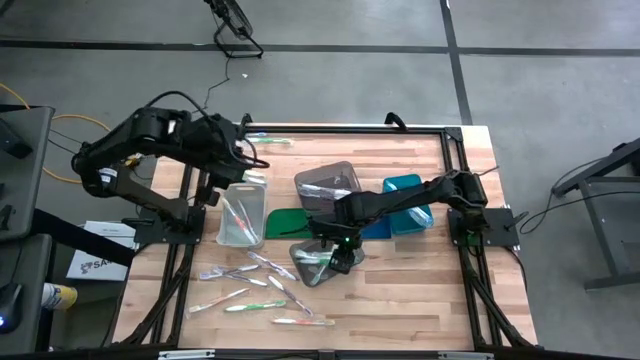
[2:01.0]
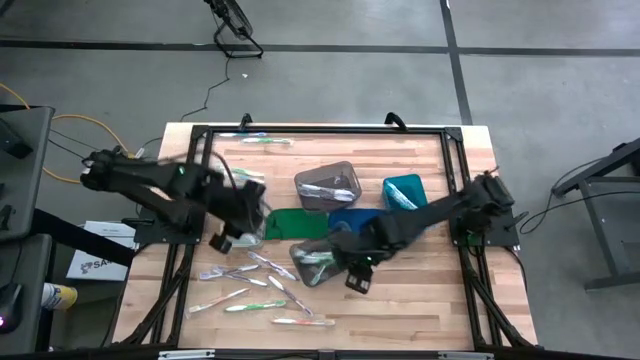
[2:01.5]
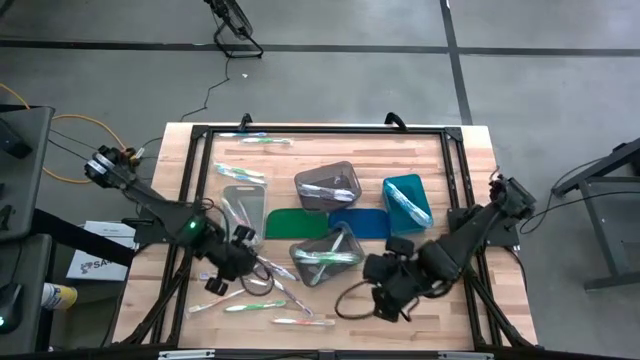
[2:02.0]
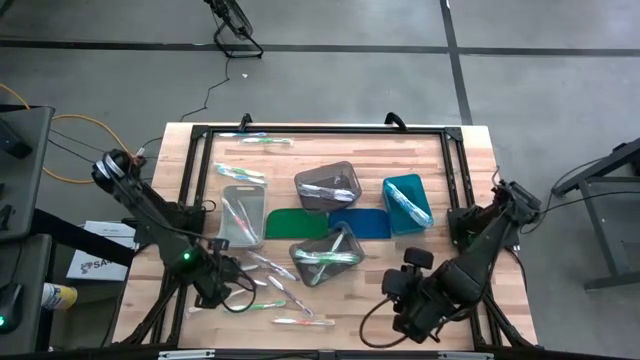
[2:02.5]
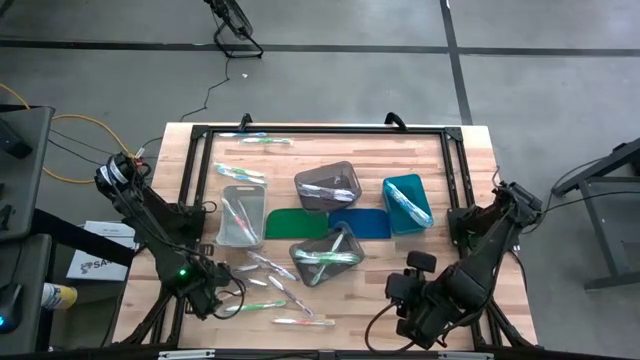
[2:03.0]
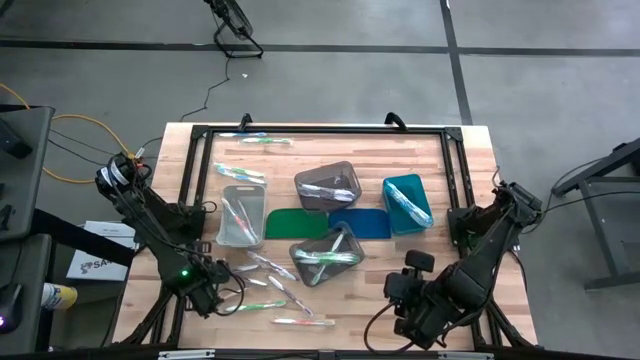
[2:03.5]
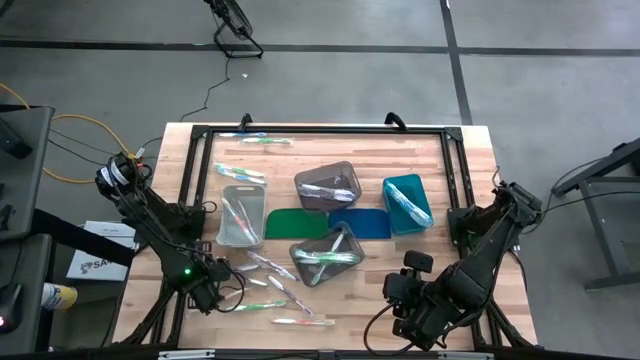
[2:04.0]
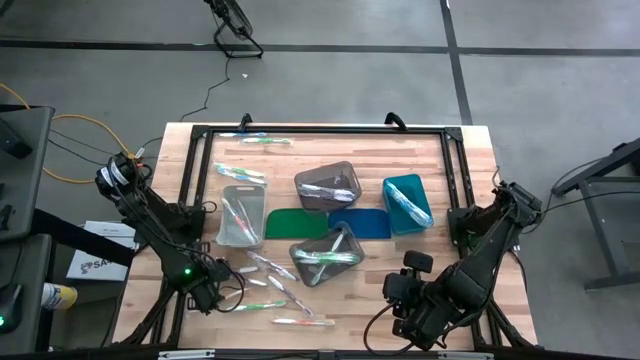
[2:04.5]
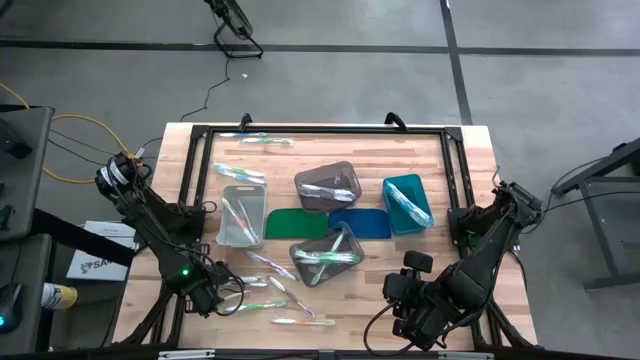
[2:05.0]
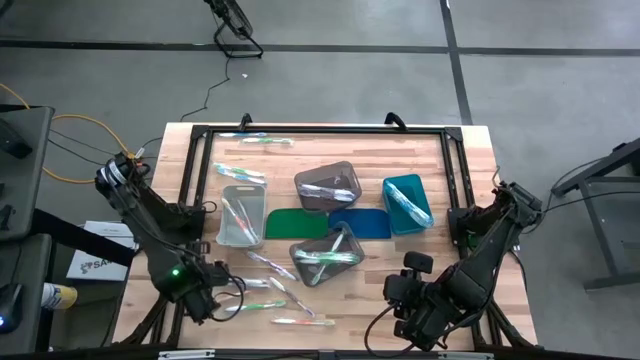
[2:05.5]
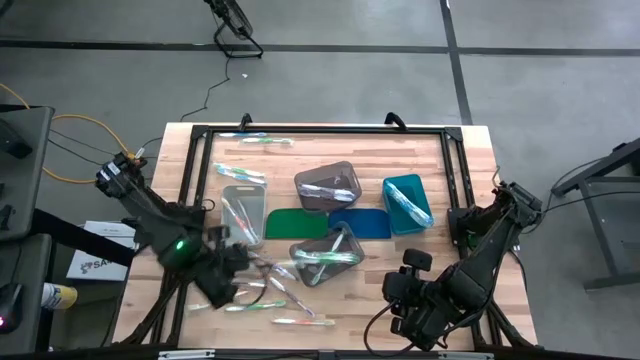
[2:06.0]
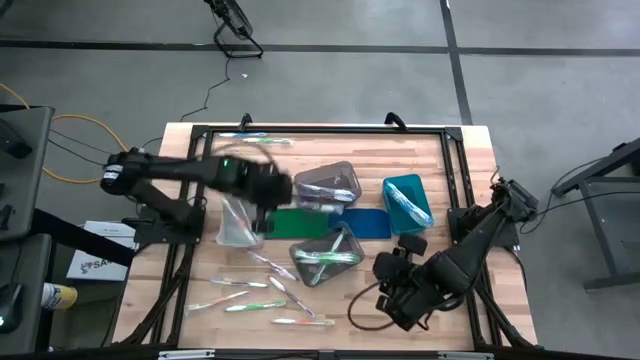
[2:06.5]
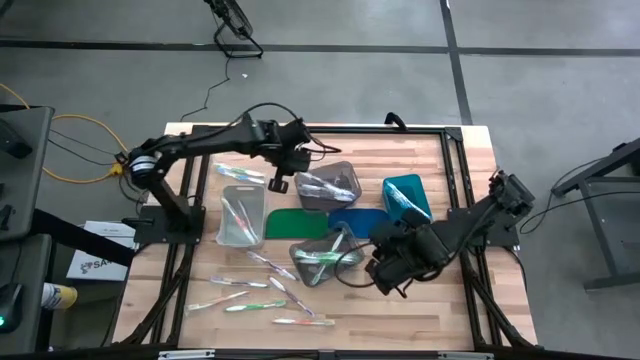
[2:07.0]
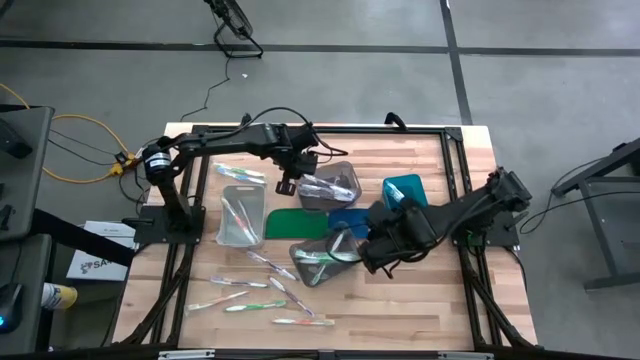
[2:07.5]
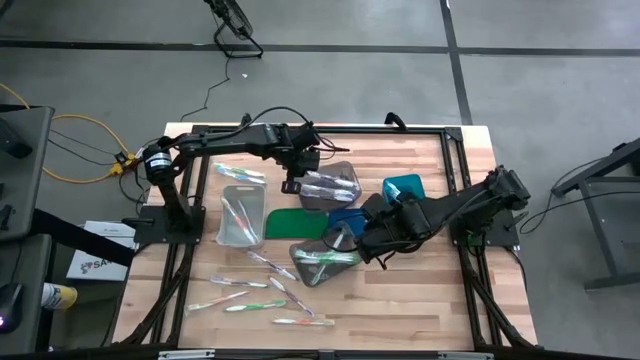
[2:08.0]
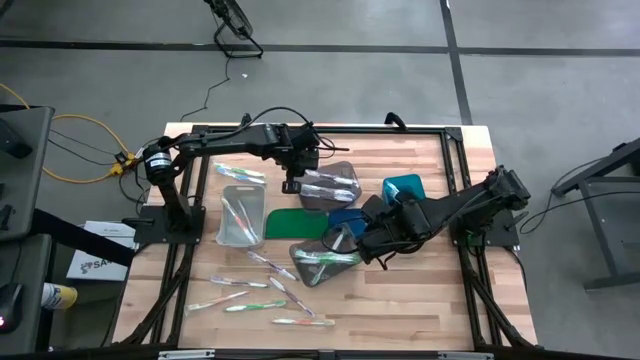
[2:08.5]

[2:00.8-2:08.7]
Task: Pick & Place Toothbrushes
Put the purple toothbrush into the top black bin

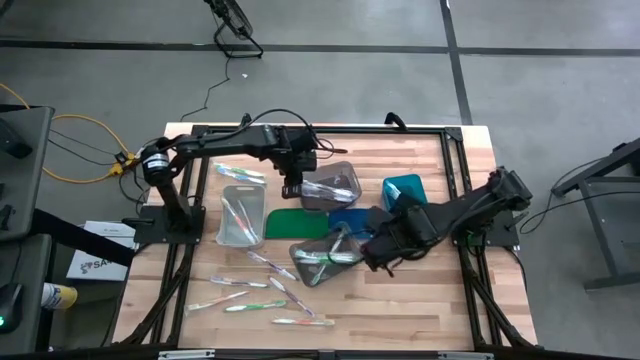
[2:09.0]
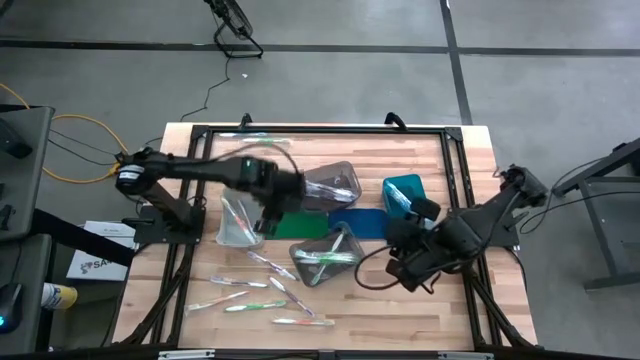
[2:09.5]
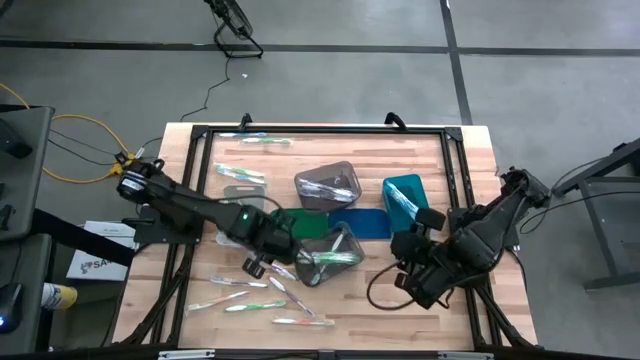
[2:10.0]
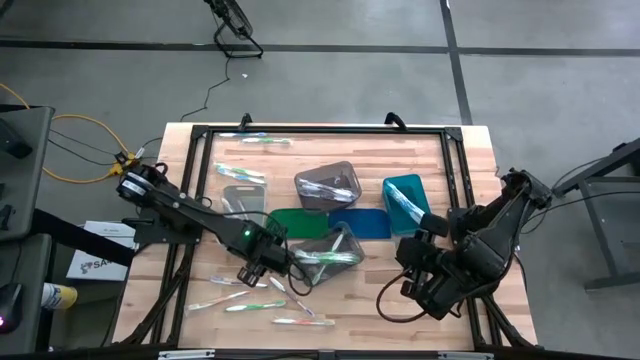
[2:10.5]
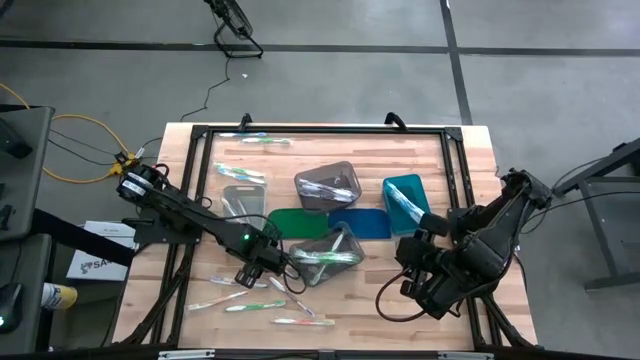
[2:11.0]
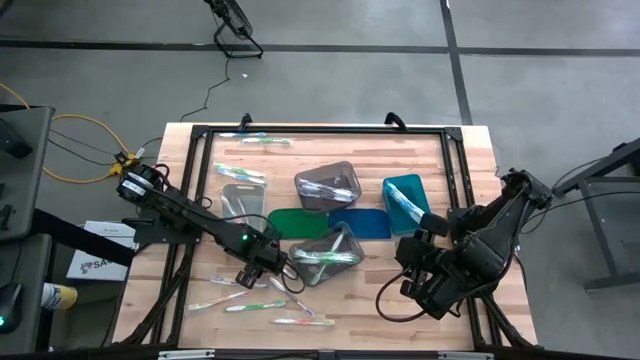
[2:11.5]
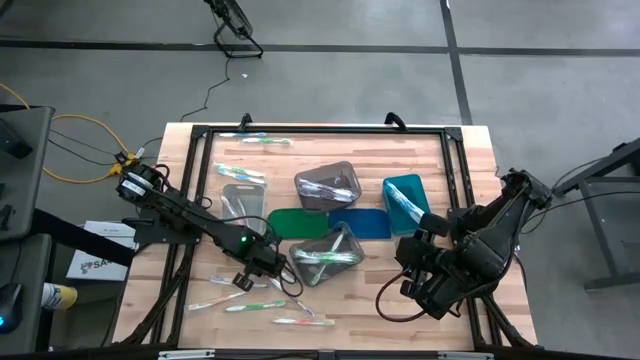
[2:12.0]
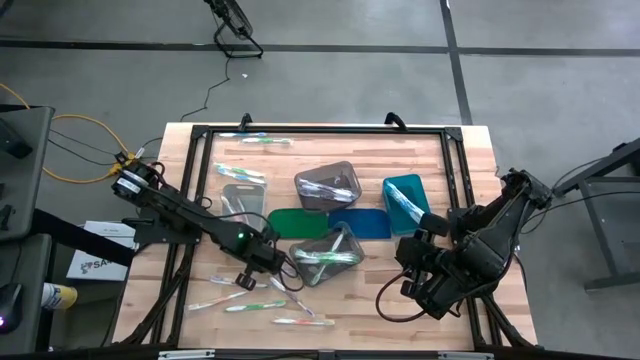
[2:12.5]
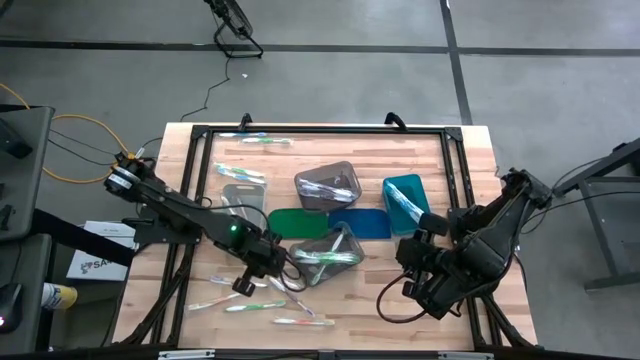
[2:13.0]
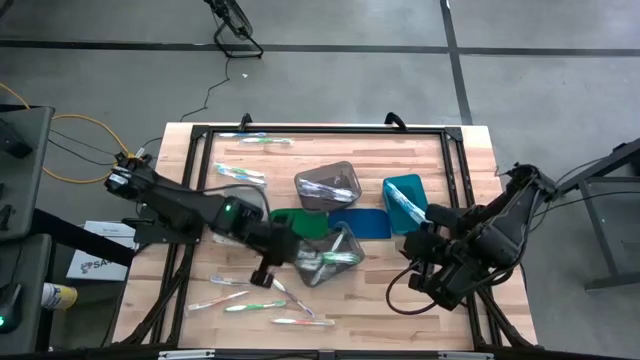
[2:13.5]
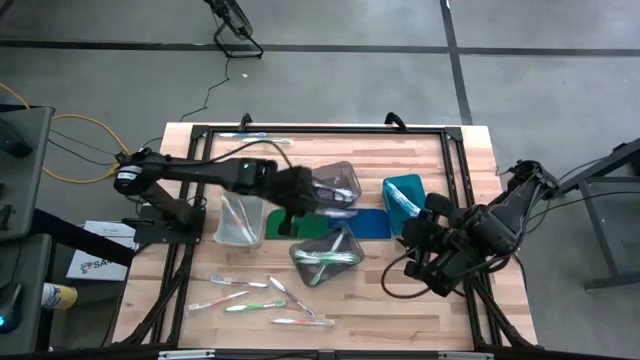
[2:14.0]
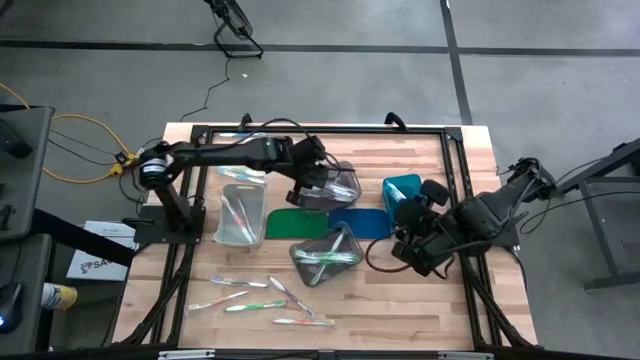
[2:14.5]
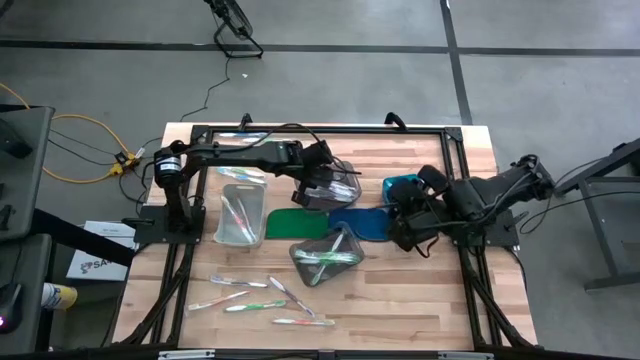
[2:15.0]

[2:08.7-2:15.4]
Put the purple toothbrush into the top black bin

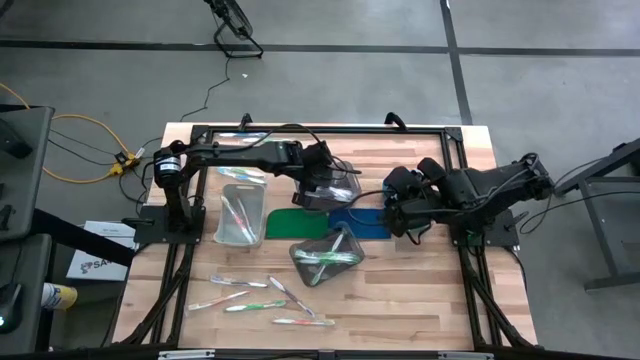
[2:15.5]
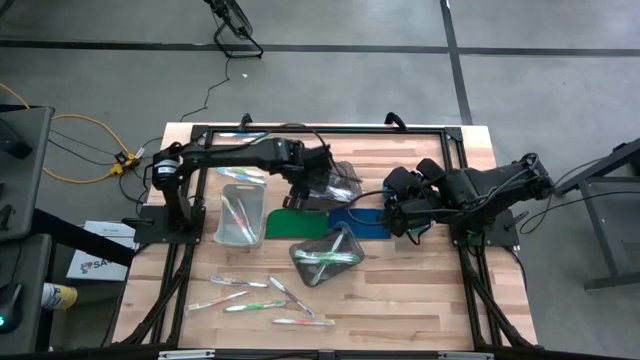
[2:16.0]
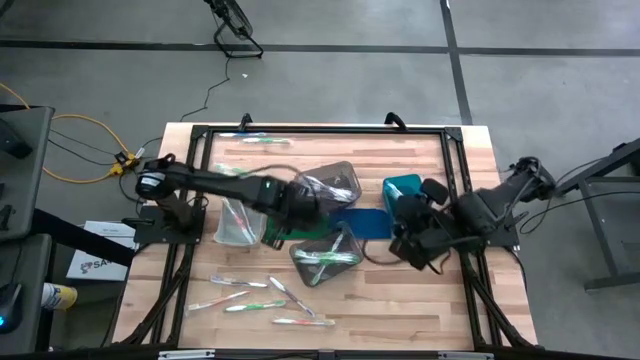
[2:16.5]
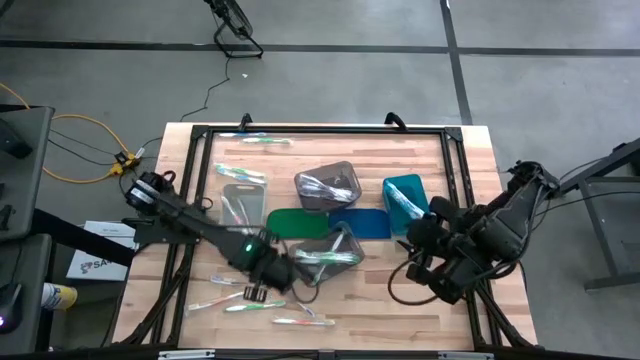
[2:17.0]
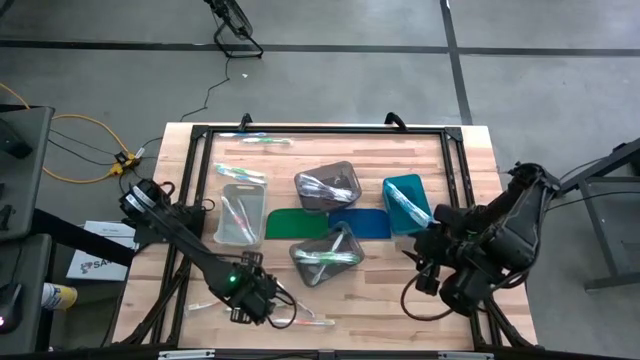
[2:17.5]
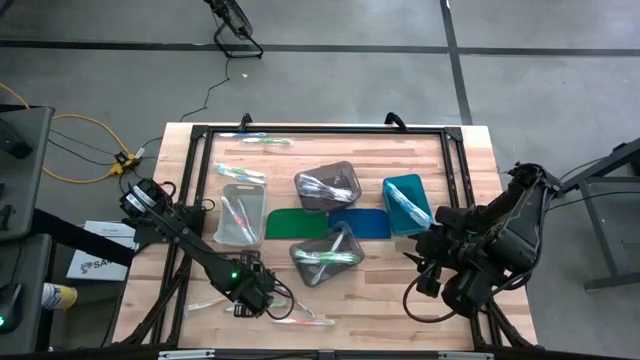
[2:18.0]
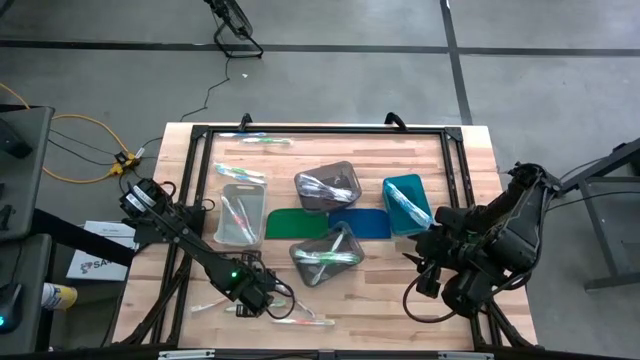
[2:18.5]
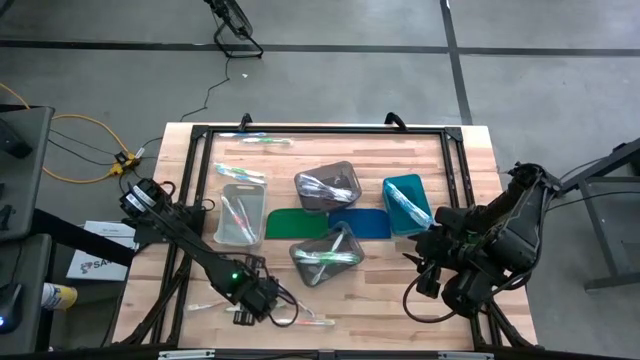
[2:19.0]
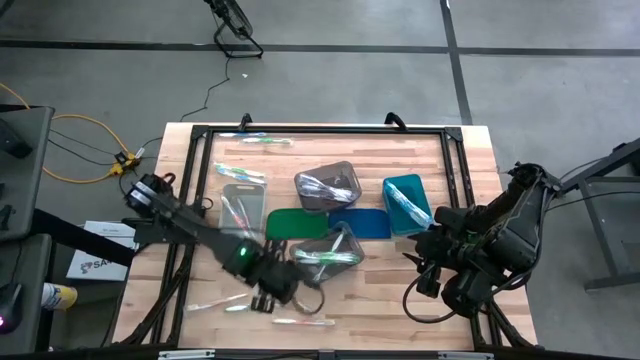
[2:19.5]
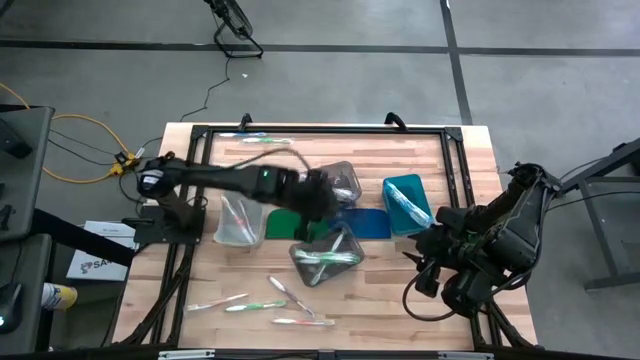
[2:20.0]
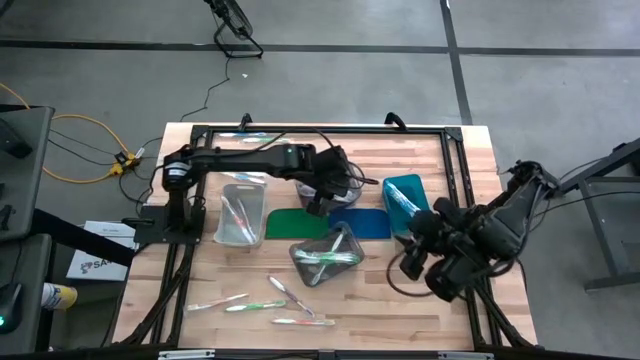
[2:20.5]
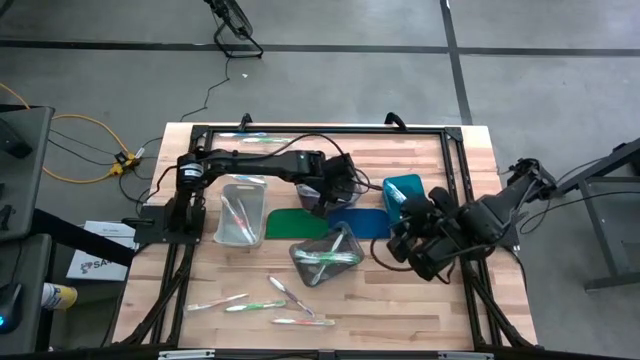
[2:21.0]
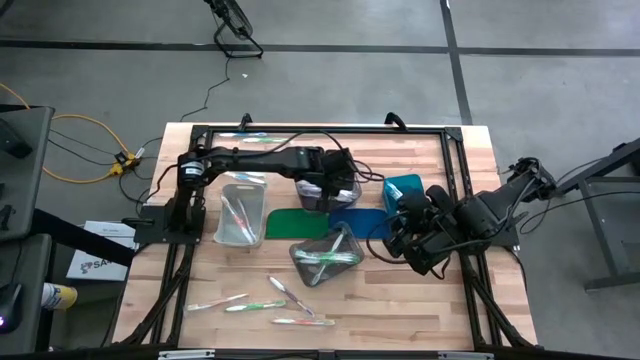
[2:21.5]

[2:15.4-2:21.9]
Put the purple toothbrush into the top black bin
